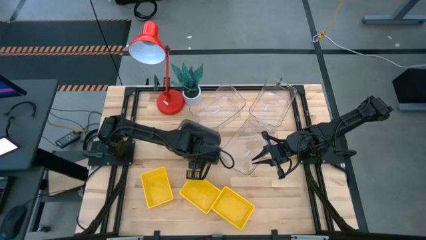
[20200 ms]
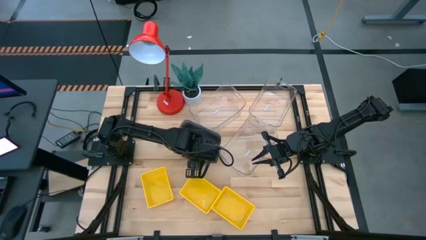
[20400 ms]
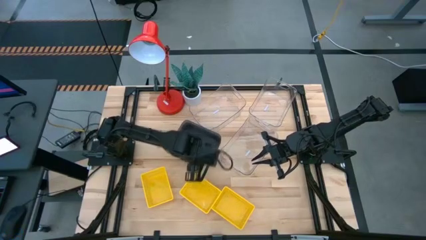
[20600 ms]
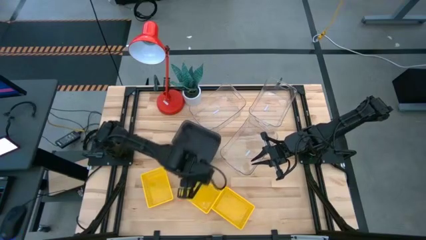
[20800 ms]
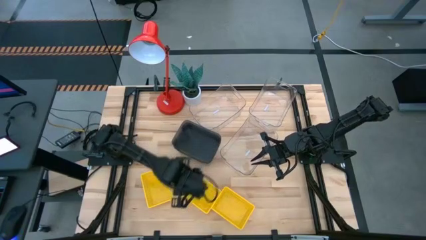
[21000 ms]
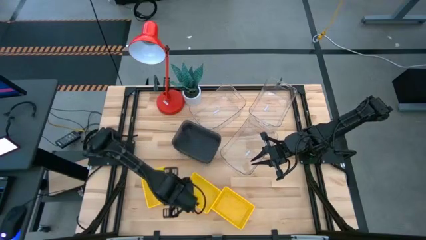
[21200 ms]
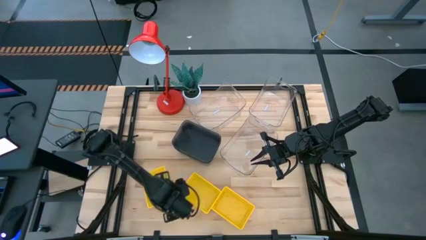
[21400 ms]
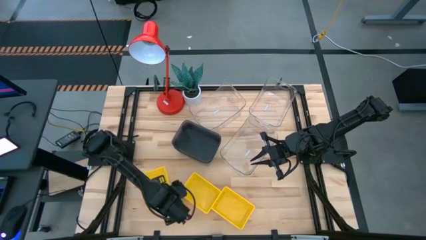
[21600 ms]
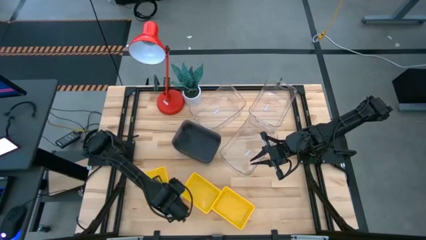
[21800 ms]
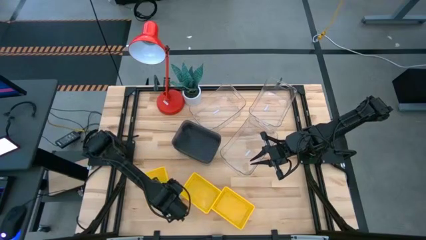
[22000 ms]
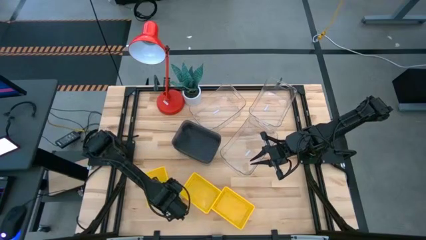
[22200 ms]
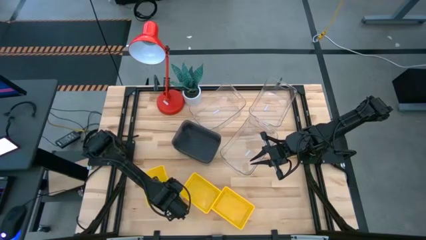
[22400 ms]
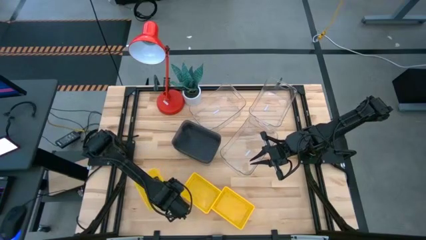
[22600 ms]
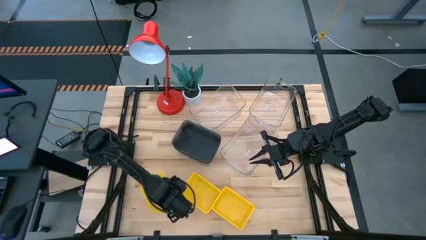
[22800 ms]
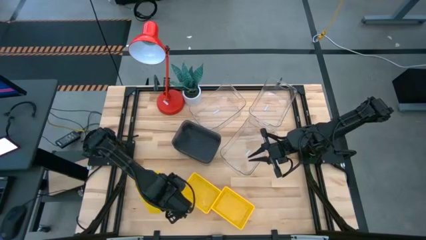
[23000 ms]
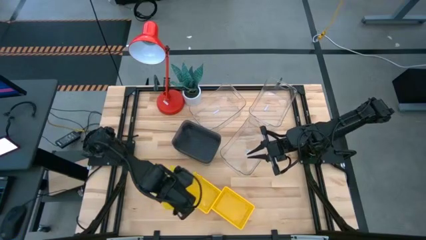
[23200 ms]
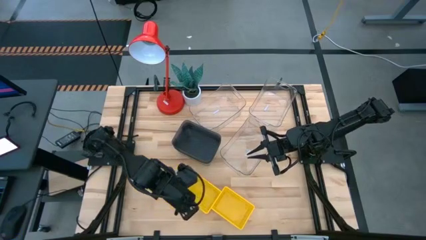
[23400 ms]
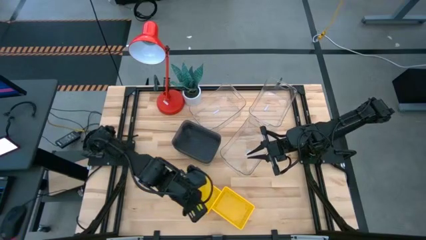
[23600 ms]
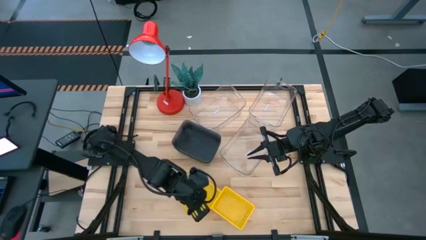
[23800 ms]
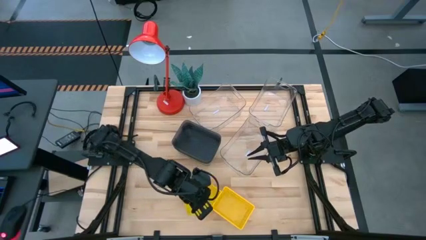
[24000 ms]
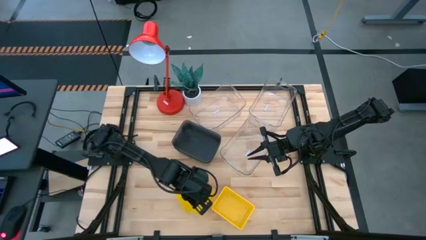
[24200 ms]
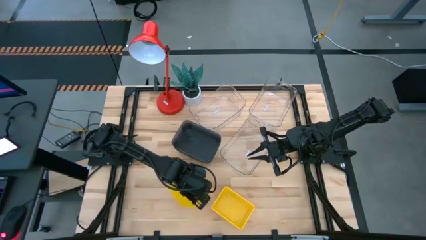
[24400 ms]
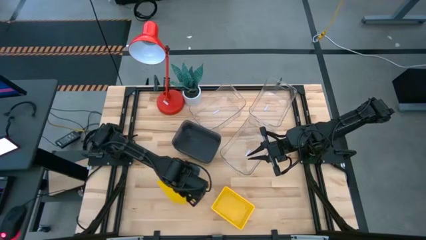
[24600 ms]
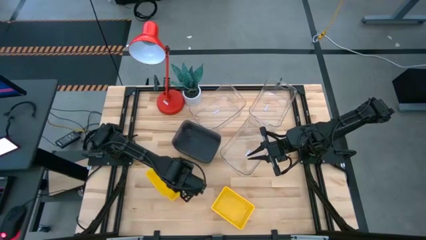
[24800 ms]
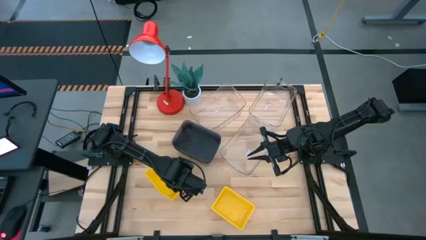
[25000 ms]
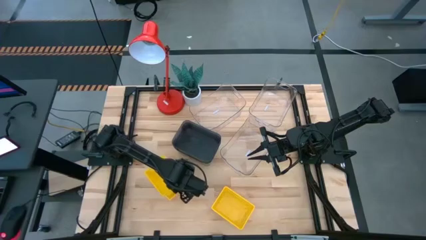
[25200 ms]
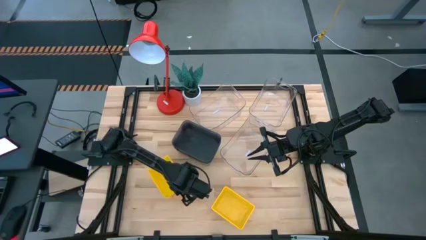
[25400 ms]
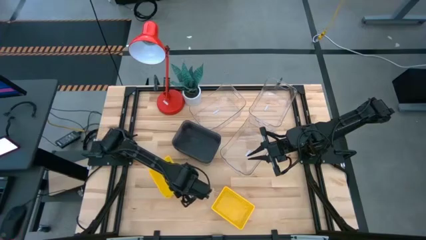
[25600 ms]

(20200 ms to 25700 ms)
Stack the left yellow bin on the middle yellow bin

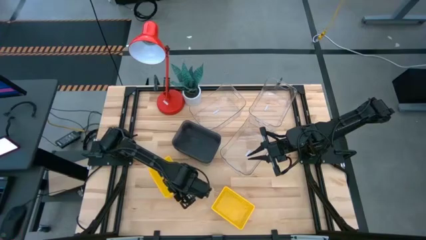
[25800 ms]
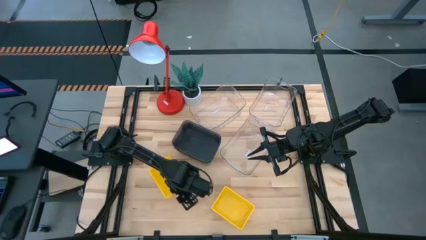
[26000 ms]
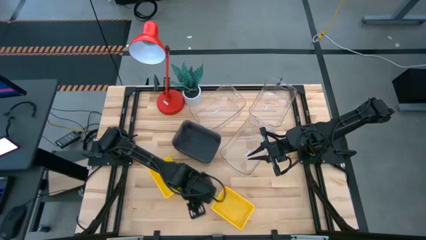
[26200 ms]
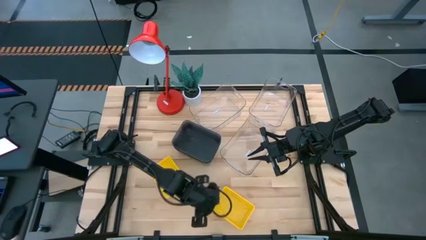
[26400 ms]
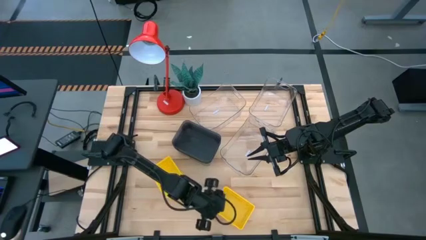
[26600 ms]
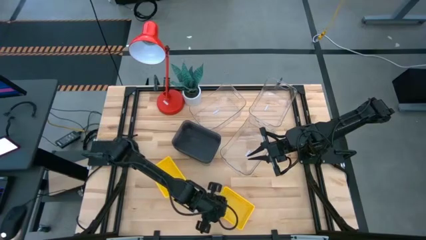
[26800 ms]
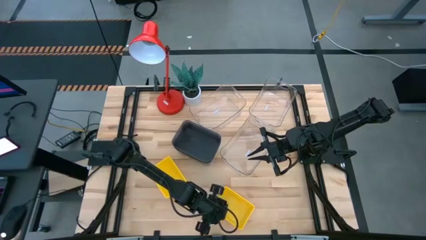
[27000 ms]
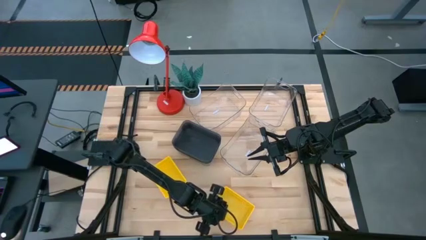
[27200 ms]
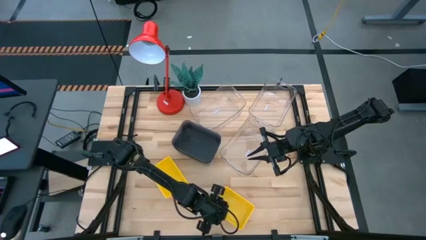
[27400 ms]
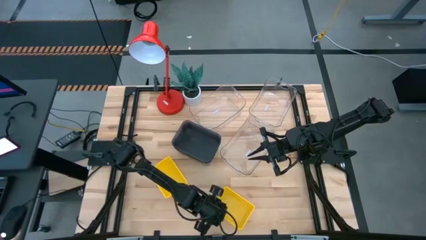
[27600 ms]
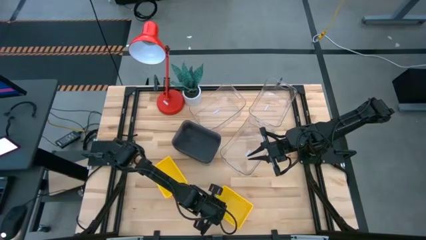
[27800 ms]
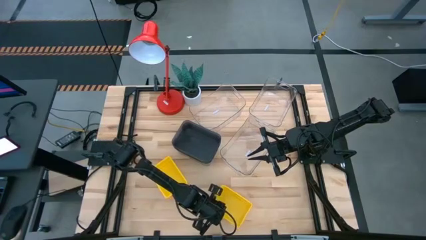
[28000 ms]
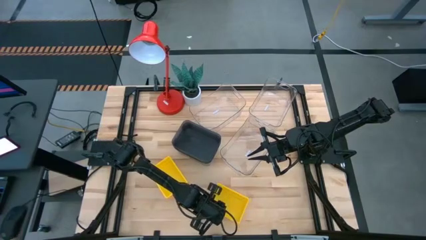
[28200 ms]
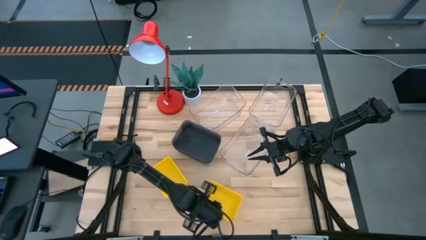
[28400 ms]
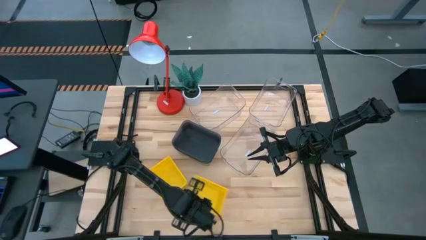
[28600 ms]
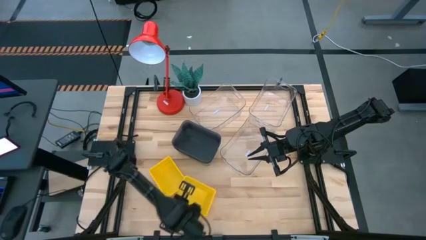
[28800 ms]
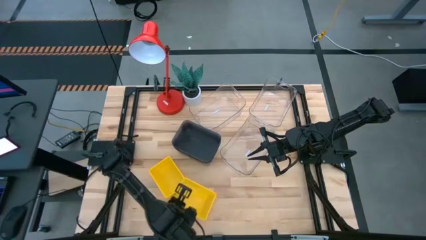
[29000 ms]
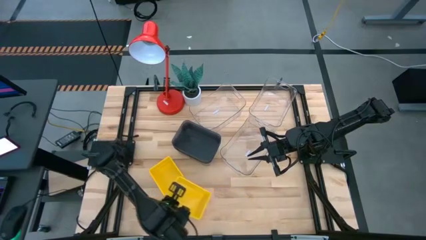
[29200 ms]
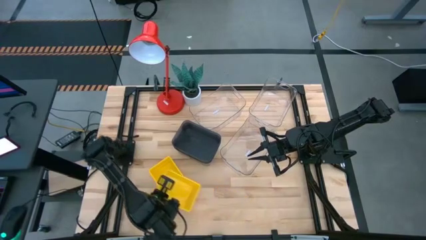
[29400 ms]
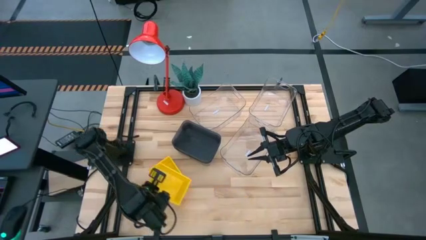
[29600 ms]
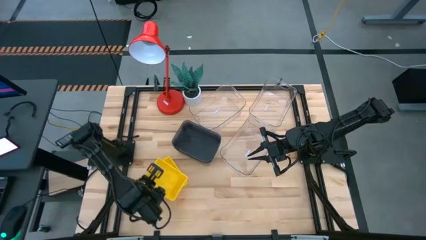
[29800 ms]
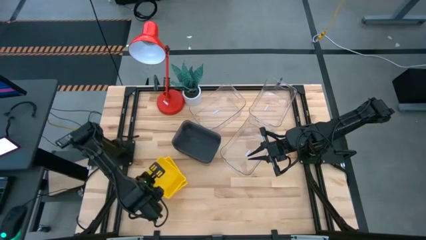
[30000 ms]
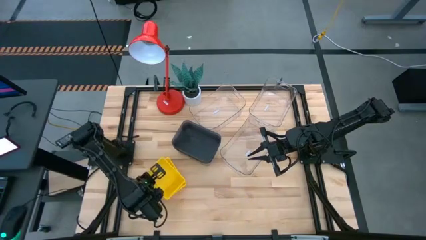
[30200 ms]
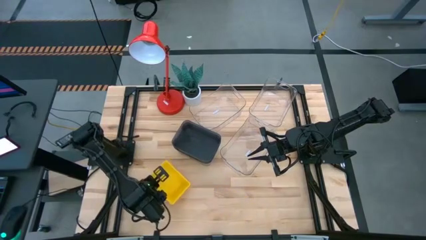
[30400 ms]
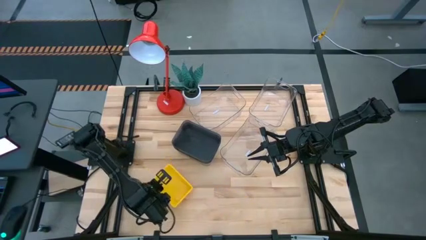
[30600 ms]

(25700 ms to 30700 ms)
Stack the right yellow bin on the yellow bins

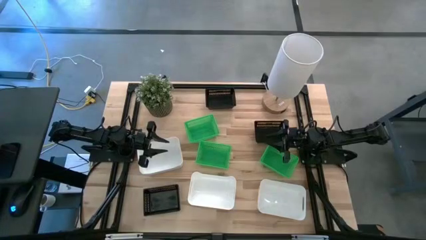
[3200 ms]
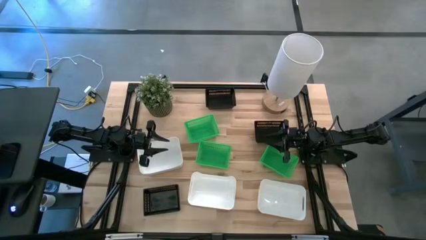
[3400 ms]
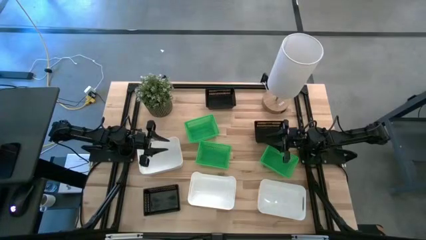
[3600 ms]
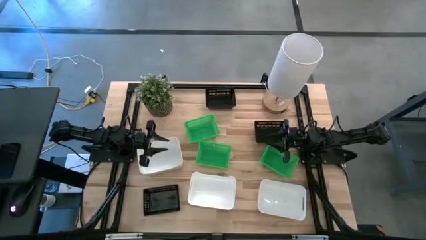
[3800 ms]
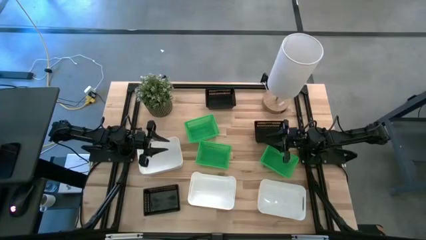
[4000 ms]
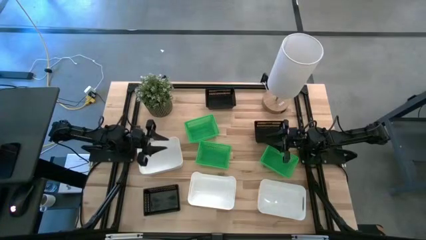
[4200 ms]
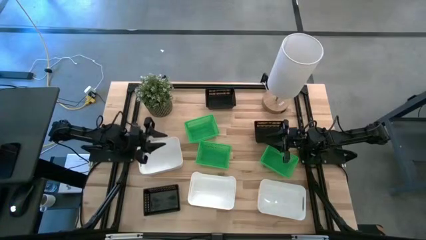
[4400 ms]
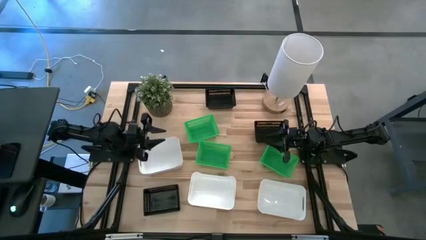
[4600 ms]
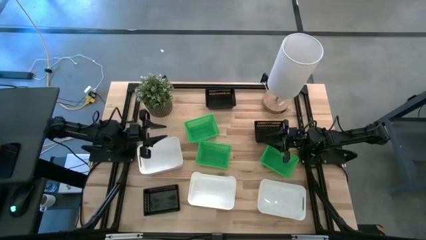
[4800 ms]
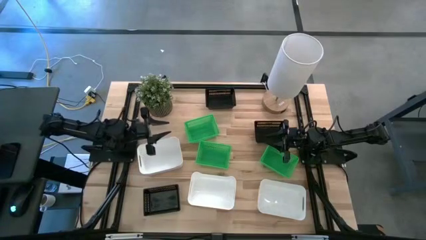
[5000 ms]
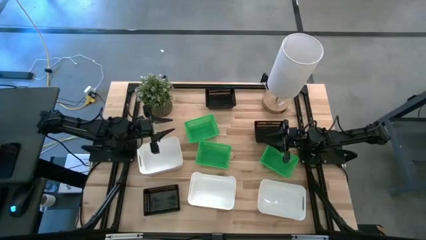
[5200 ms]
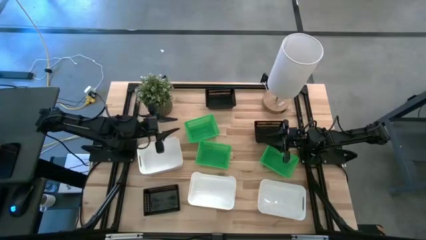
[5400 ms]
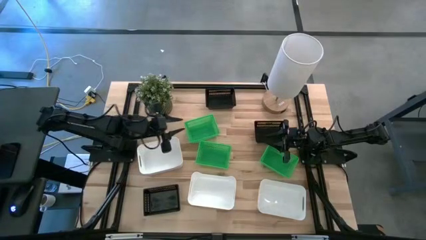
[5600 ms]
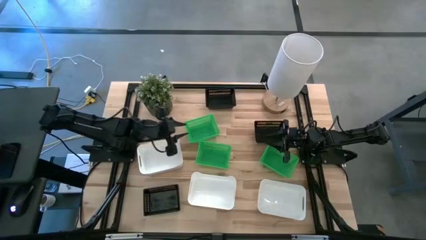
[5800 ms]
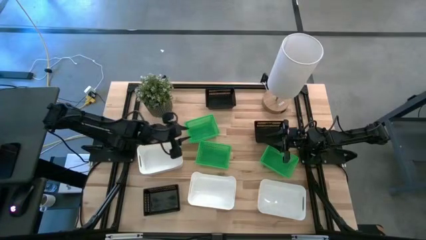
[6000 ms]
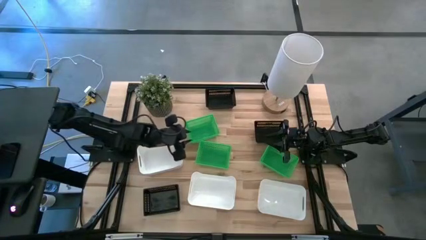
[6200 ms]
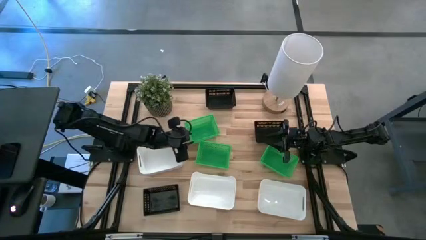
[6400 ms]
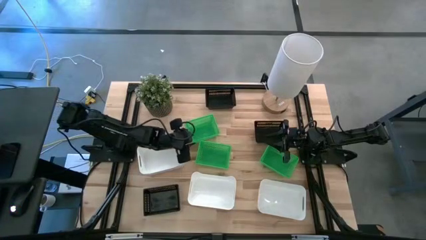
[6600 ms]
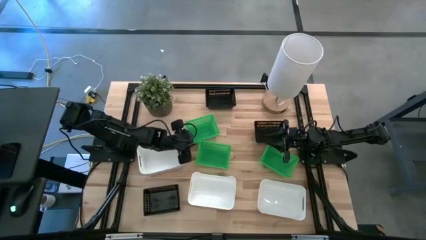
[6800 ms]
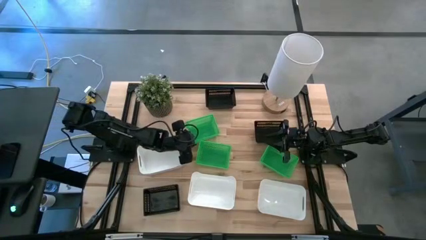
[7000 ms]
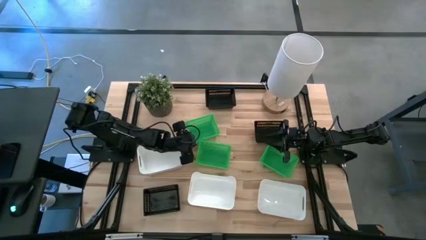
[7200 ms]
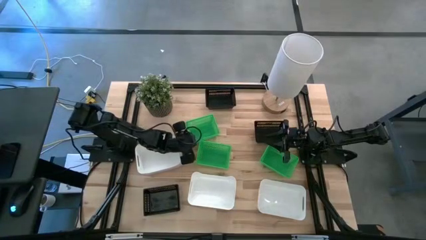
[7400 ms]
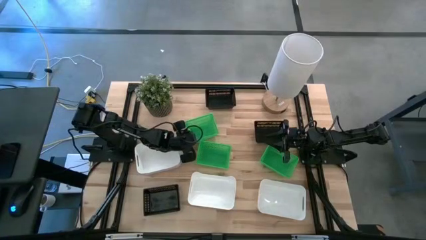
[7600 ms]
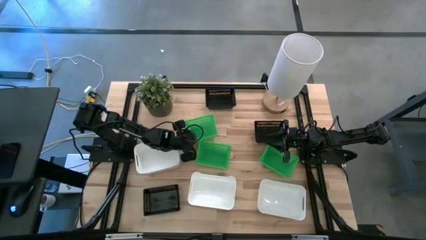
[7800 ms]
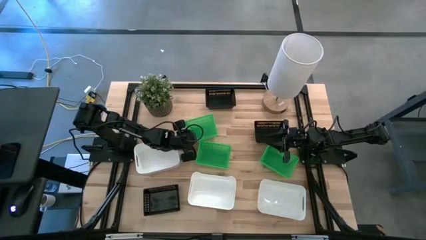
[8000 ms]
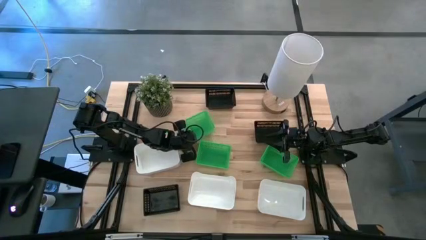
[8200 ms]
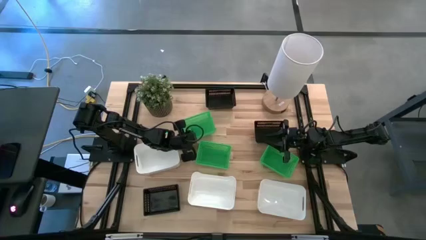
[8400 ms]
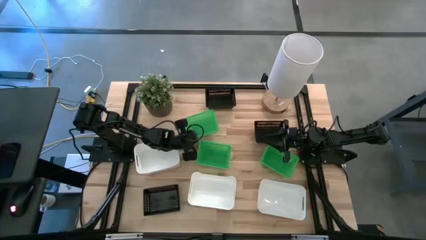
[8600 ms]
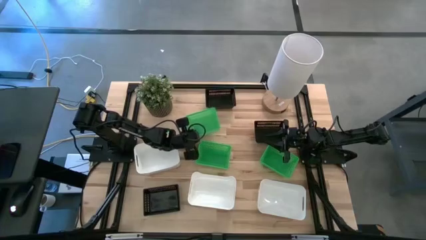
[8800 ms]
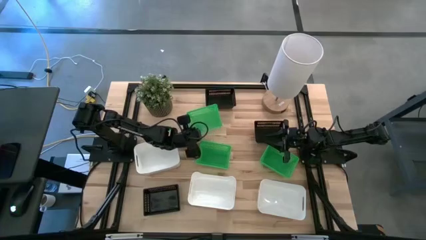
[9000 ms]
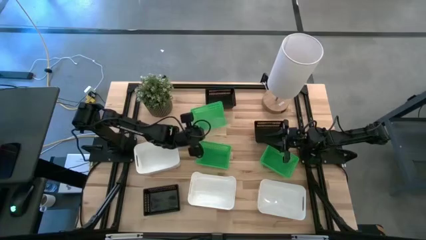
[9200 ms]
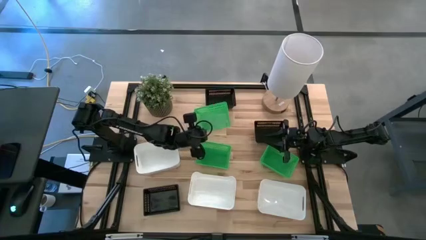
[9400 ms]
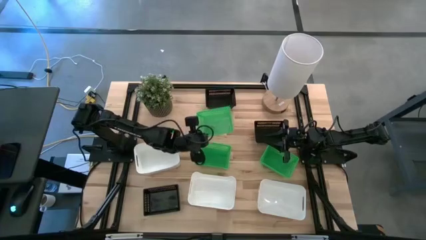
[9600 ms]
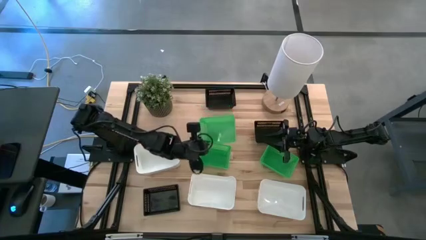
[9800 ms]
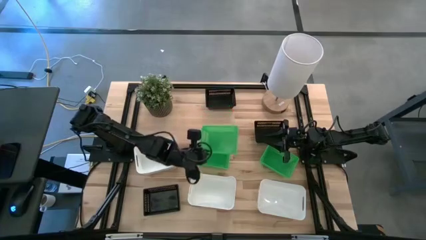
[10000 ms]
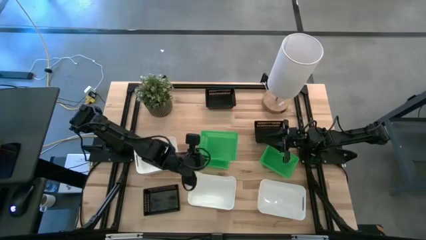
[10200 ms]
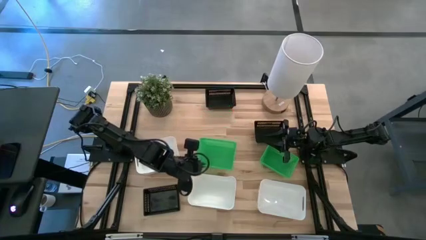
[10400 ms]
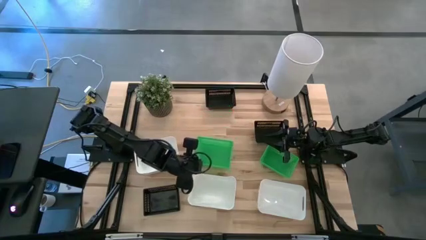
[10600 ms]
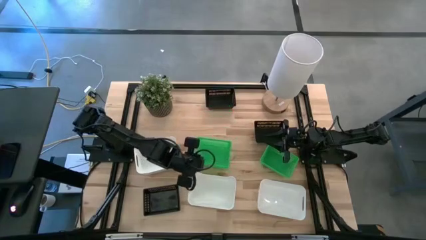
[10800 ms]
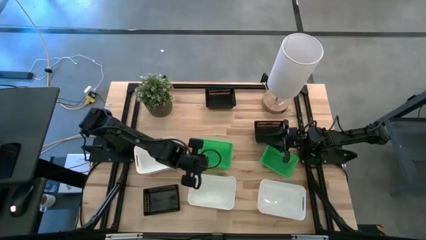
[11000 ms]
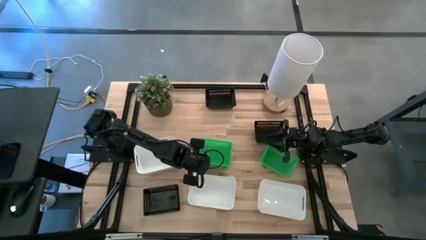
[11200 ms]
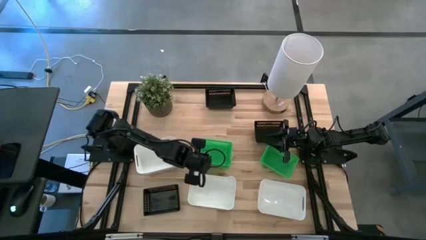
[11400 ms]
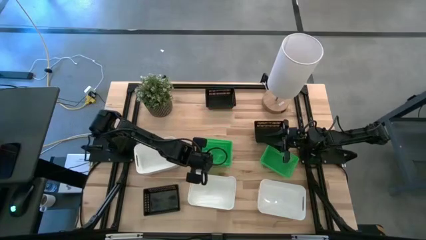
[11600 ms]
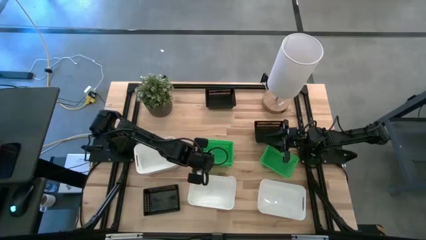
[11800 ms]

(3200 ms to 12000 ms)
Stack the top left green bin on the left green bin
